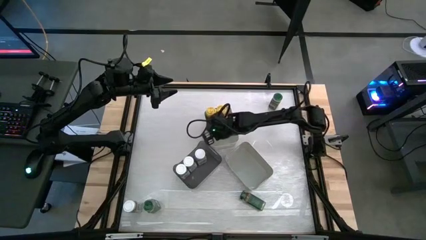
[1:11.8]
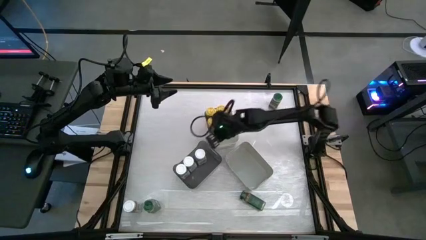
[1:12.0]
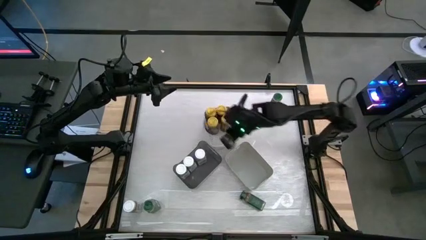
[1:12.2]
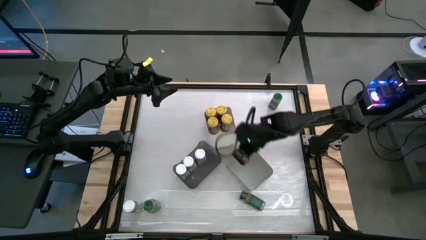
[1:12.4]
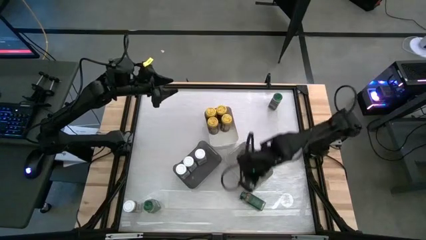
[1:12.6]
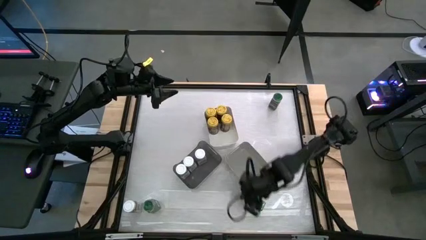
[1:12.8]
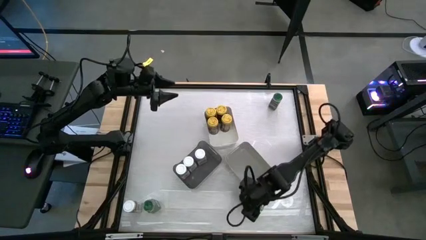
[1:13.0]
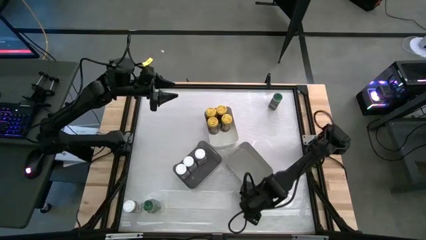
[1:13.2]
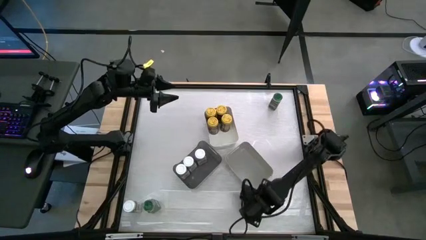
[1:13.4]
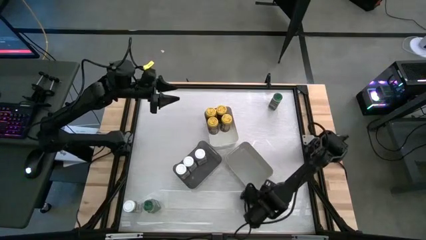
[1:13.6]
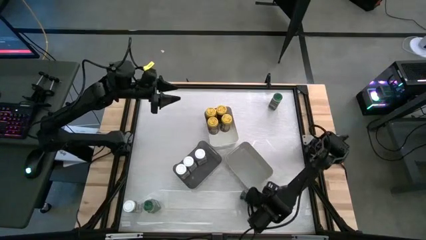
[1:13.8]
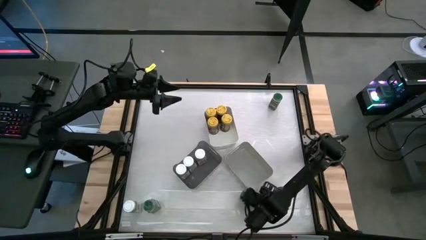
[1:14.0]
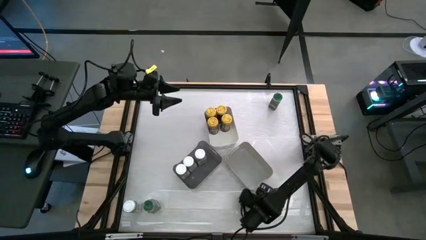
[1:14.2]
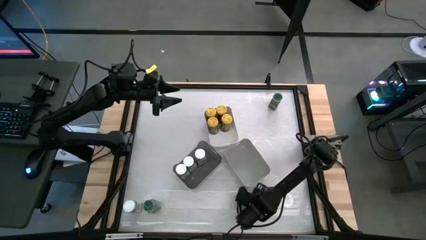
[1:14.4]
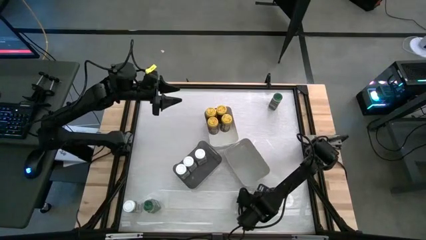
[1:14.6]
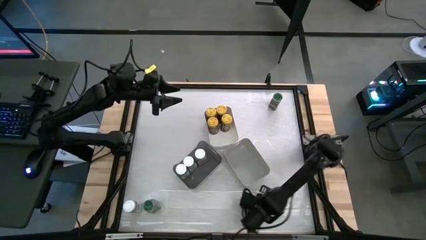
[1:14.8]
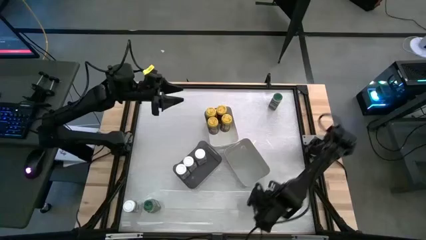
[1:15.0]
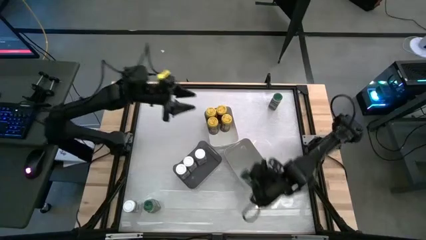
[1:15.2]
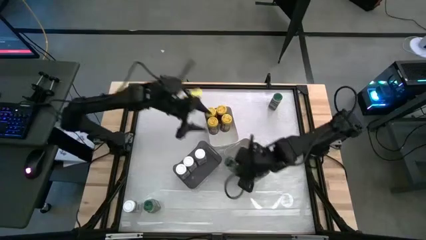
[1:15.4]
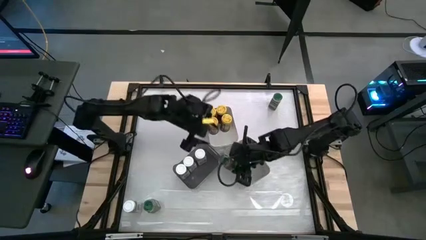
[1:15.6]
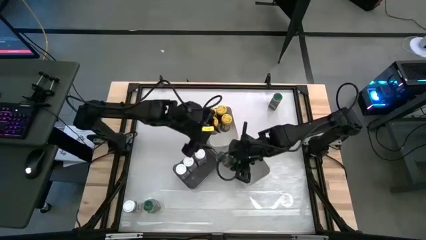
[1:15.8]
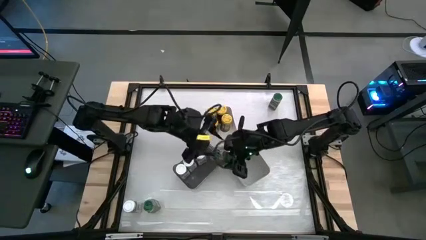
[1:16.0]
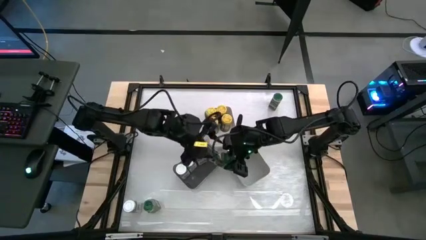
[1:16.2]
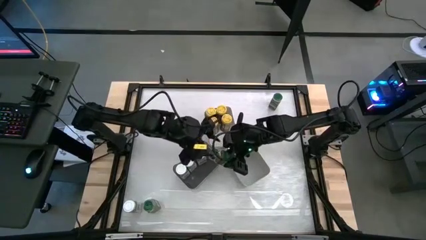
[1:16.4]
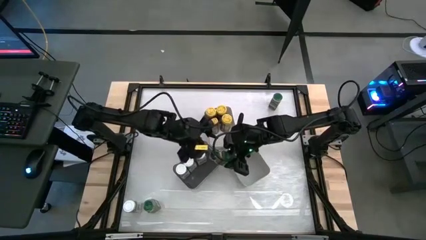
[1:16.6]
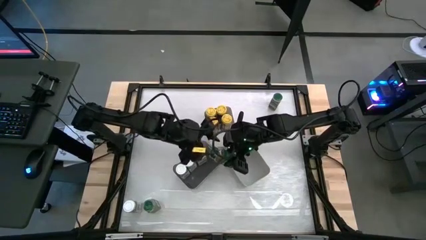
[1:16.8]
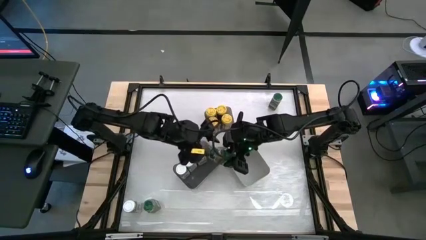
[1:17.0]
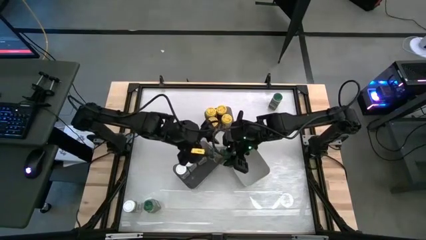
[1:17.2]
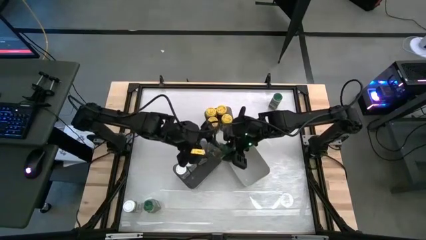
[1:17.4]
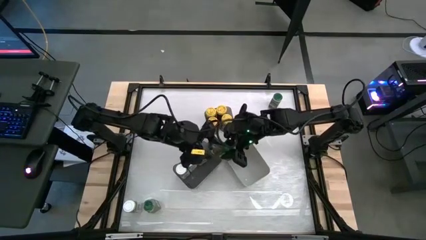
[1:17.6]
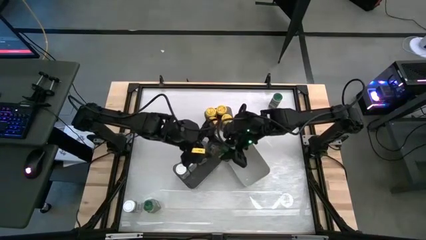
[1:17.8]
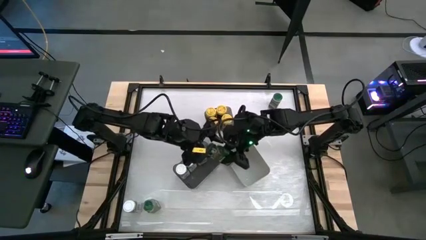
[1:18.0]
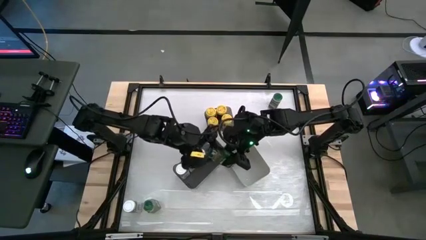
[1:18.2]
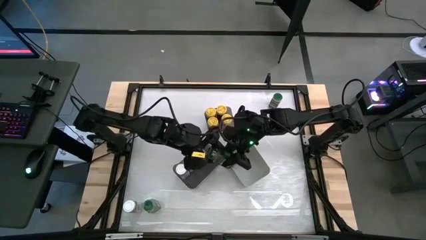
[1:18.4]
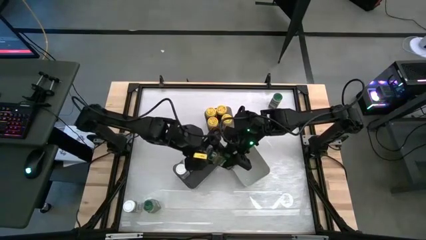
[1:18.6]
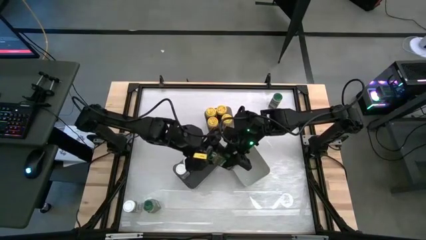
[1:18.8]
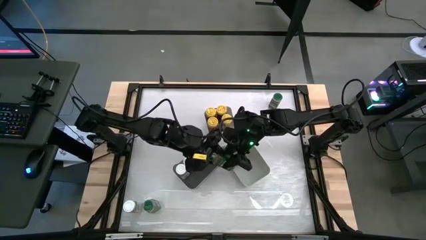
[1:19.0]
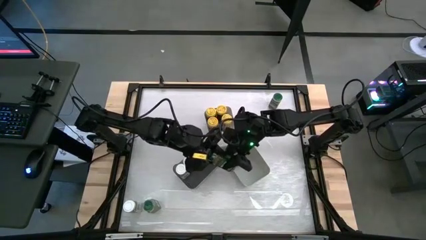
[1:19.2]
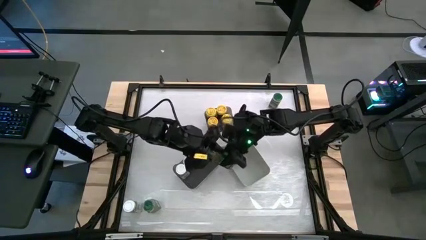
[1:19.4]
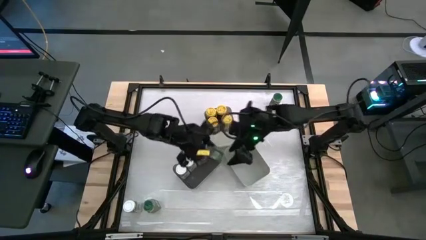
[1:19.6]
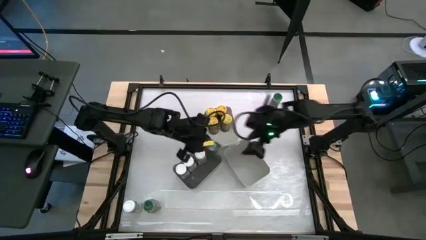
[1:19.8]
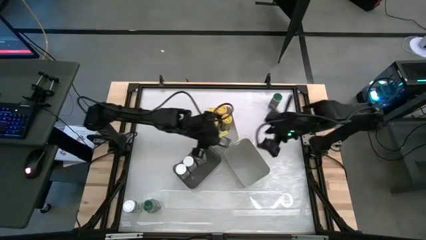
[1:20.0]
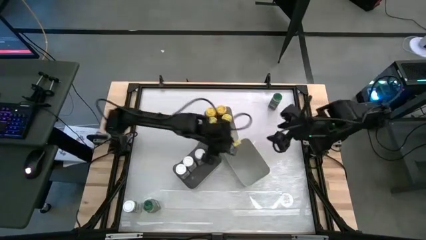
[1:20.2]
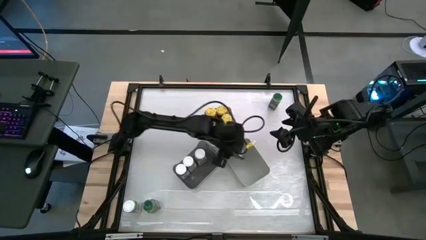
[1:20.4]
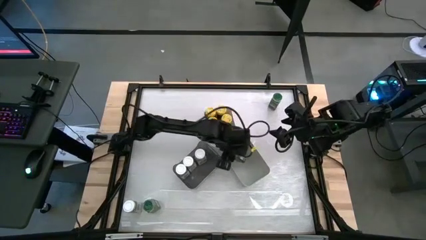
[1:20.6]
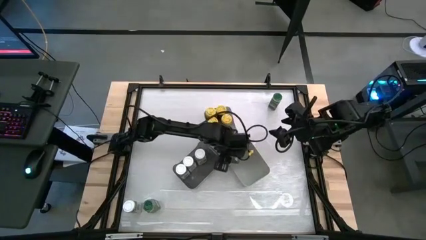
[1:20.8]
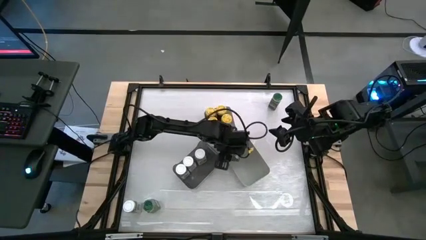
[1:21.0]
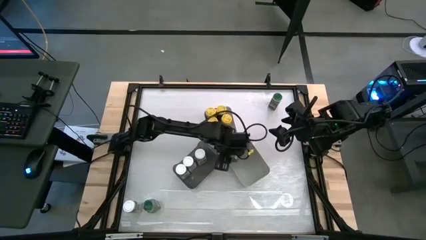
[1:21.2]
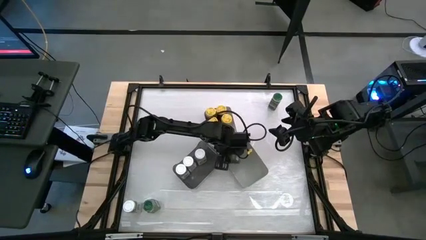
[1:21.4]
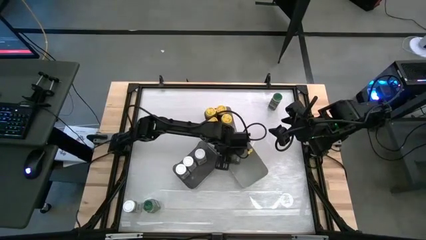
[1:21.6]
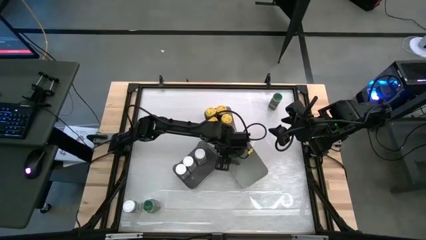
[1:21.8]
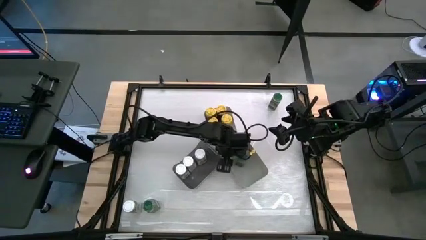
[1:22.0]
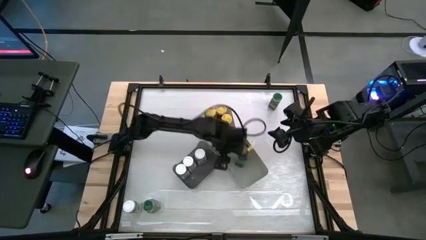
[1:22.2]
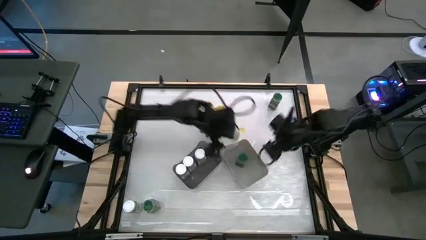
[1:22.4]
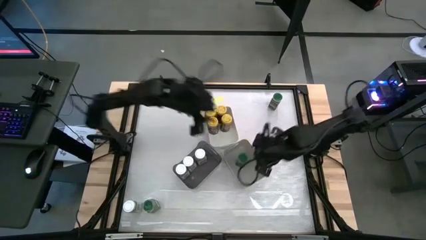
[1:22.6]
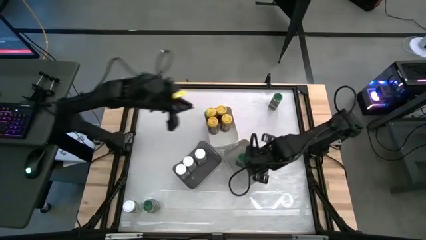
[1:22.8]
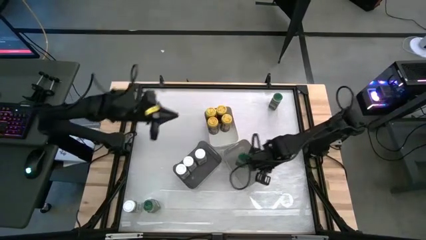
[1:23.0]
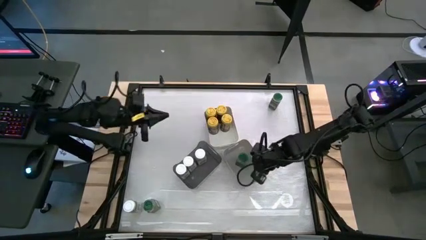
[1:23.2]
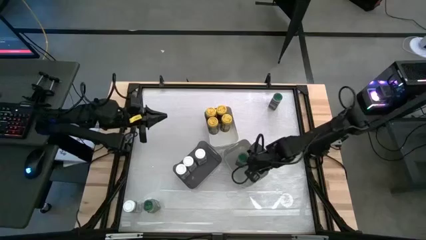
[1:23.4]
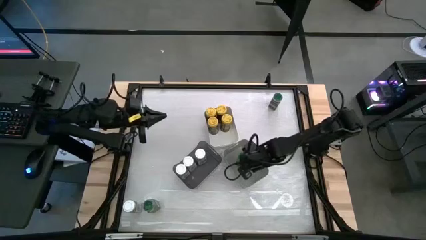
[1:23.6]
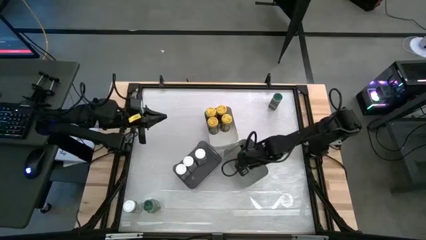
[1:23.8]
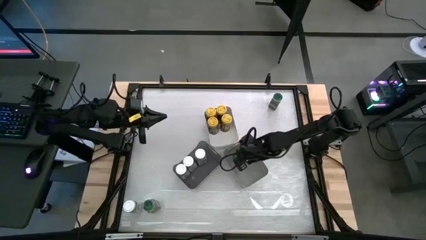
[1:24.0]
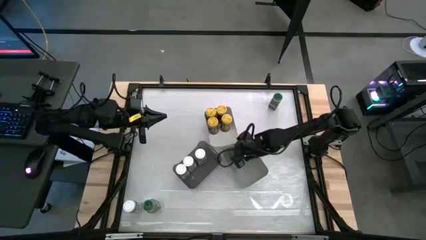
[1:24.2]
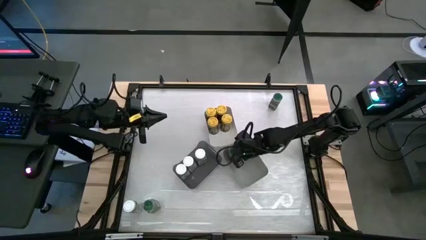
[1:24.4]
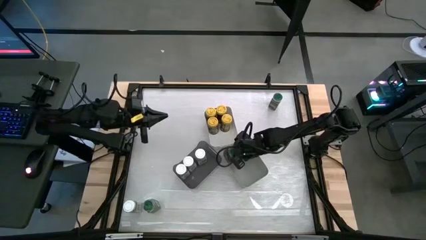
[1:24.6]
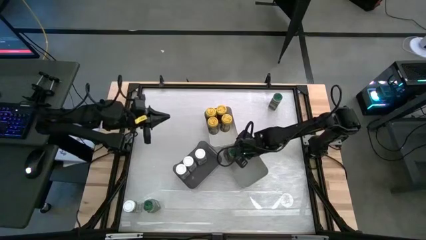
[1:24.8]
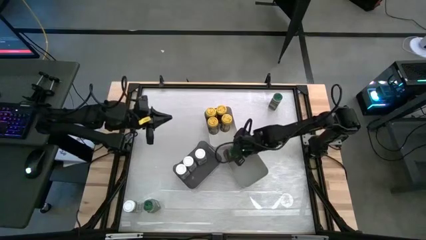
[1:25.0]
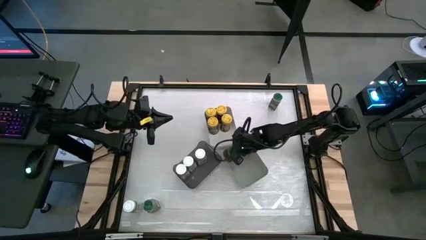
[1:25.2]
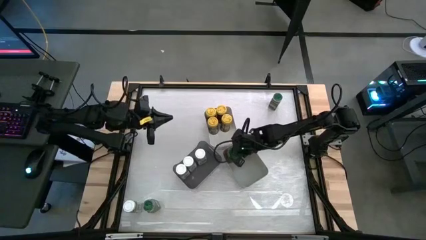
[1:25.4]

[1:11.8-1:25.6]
Task: Sort spices by type
Put the bottom right green seasoning bottle into the gray bin
